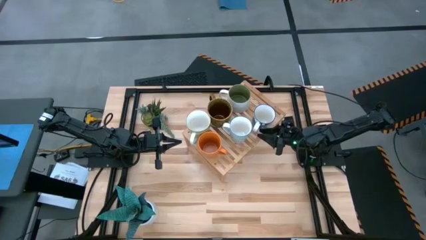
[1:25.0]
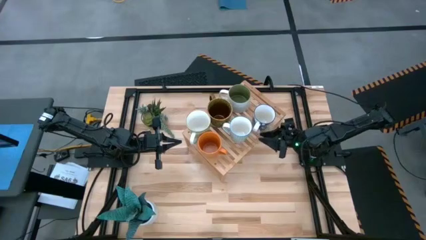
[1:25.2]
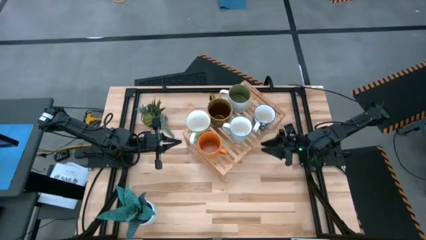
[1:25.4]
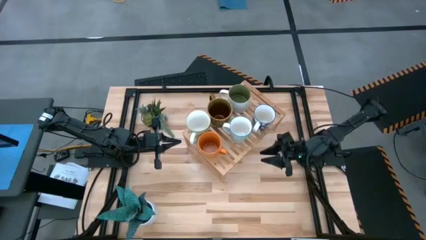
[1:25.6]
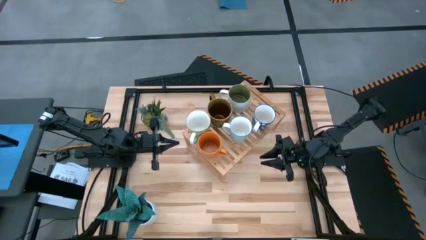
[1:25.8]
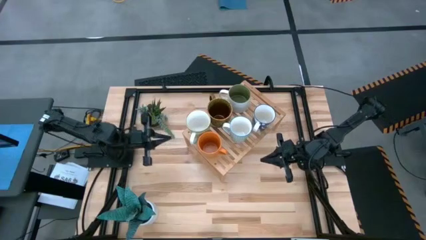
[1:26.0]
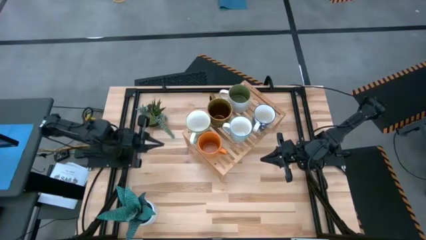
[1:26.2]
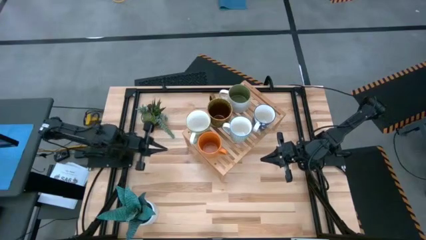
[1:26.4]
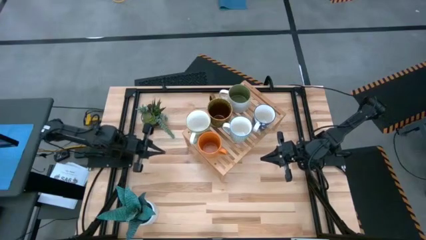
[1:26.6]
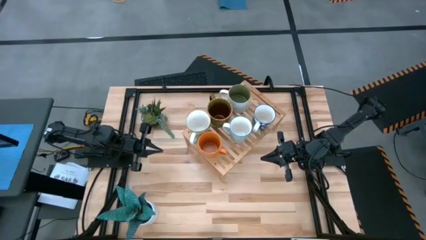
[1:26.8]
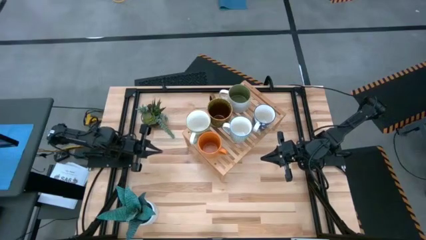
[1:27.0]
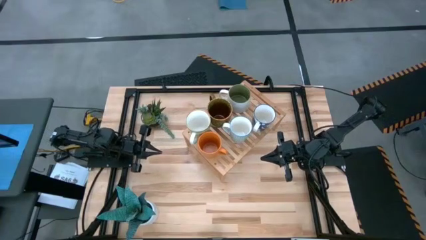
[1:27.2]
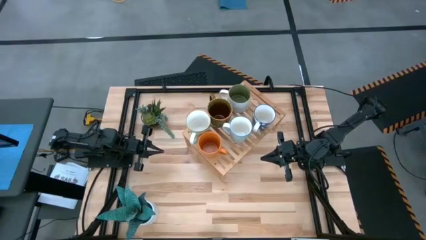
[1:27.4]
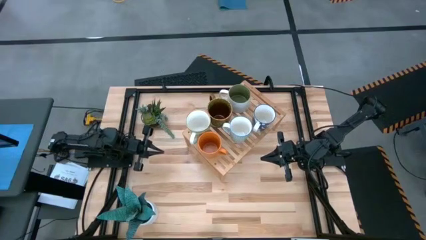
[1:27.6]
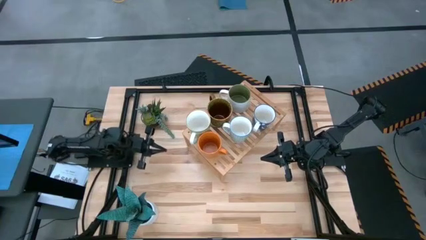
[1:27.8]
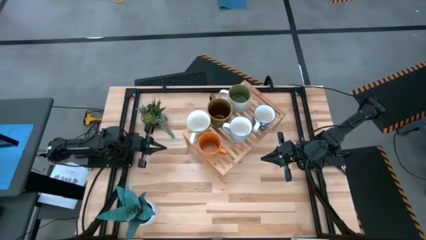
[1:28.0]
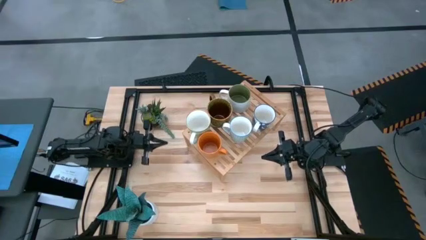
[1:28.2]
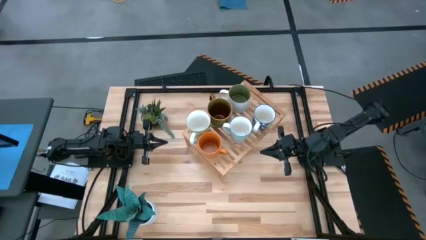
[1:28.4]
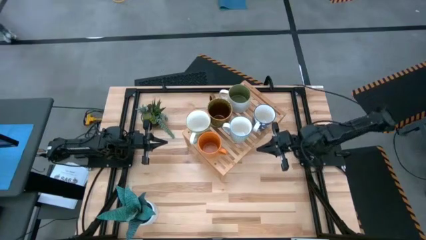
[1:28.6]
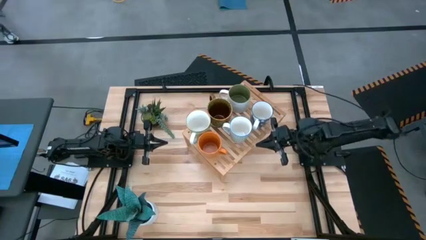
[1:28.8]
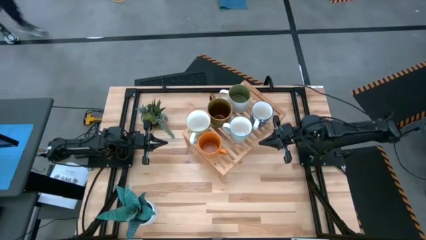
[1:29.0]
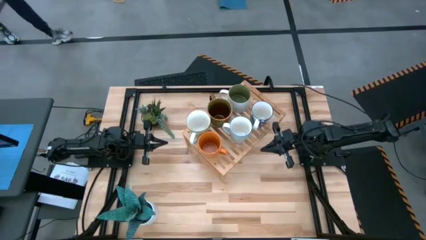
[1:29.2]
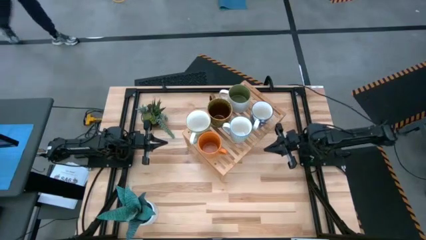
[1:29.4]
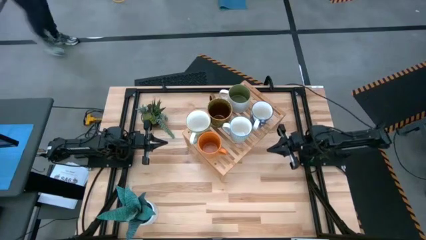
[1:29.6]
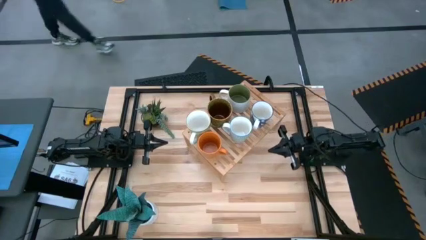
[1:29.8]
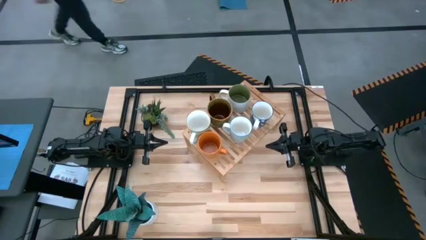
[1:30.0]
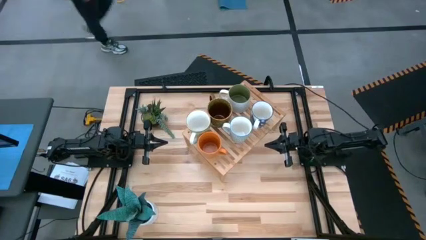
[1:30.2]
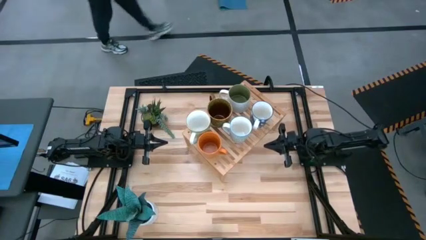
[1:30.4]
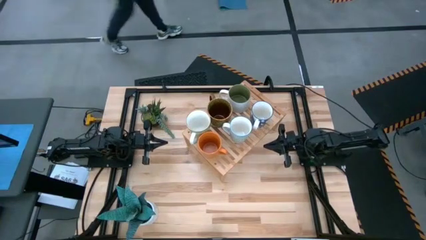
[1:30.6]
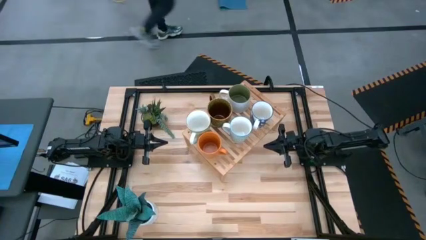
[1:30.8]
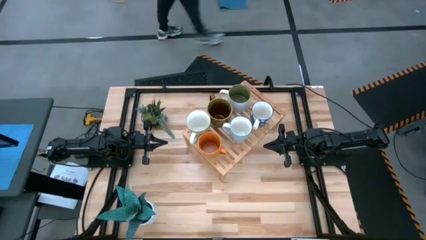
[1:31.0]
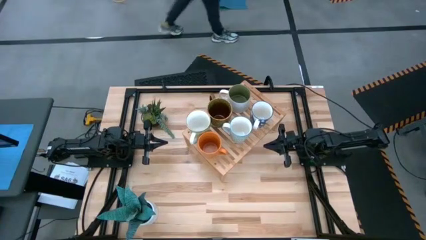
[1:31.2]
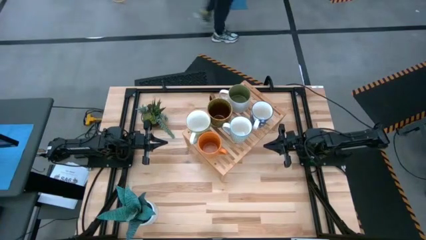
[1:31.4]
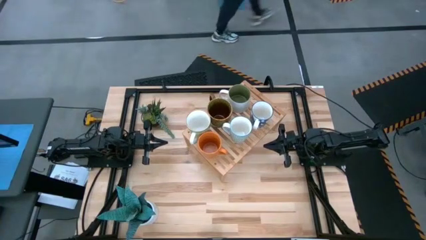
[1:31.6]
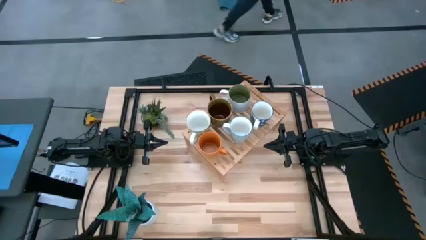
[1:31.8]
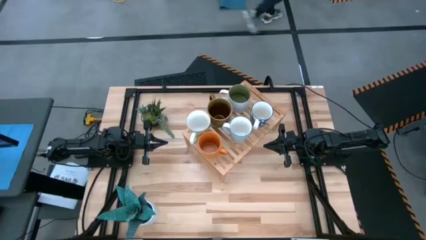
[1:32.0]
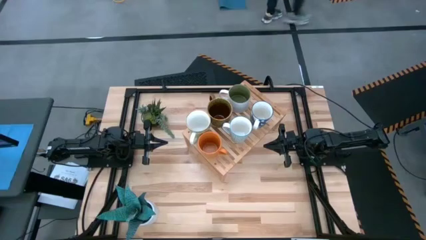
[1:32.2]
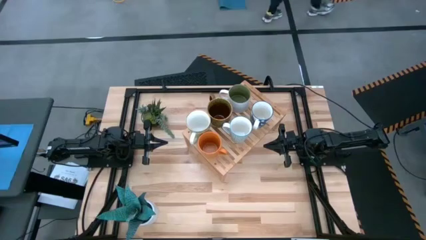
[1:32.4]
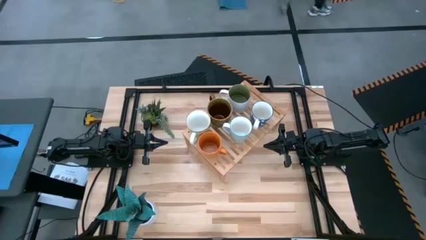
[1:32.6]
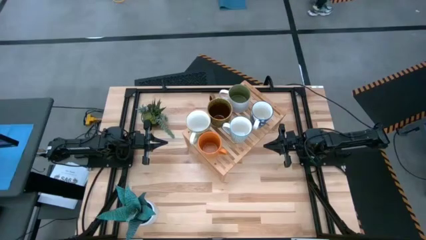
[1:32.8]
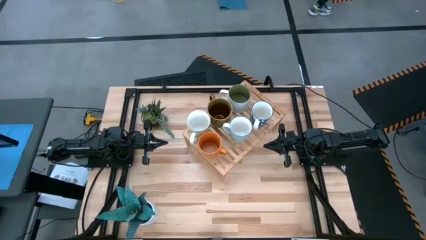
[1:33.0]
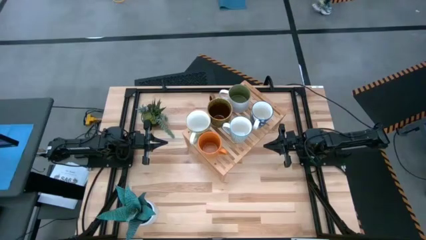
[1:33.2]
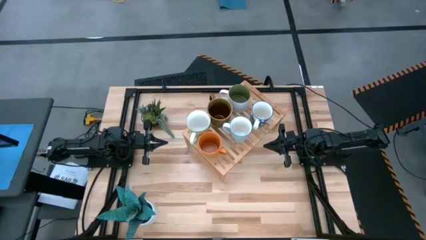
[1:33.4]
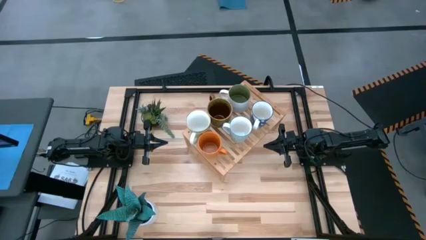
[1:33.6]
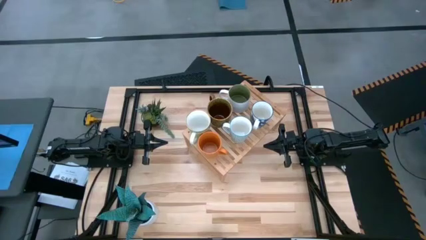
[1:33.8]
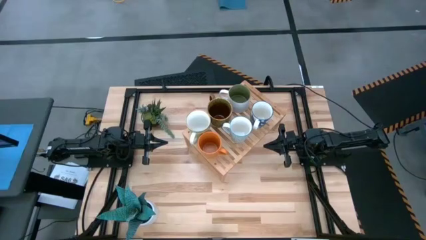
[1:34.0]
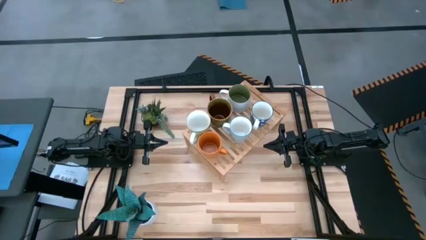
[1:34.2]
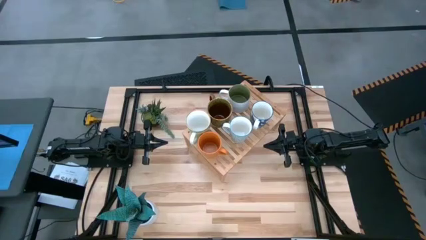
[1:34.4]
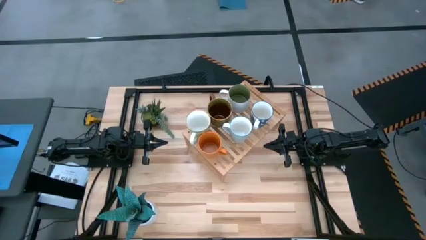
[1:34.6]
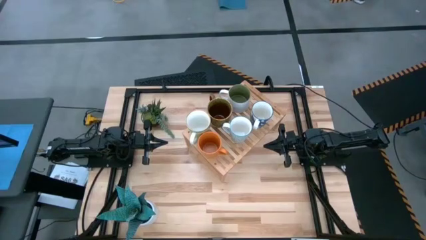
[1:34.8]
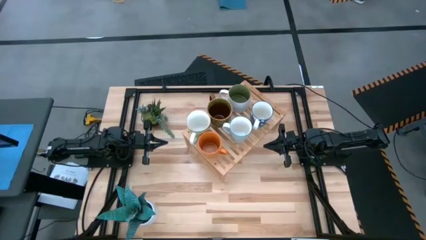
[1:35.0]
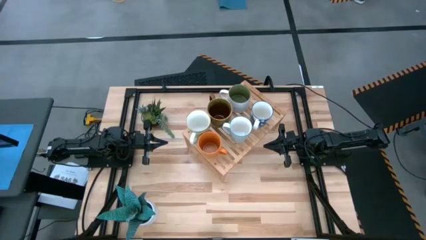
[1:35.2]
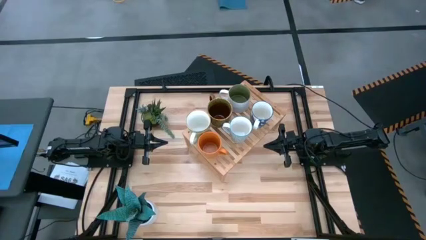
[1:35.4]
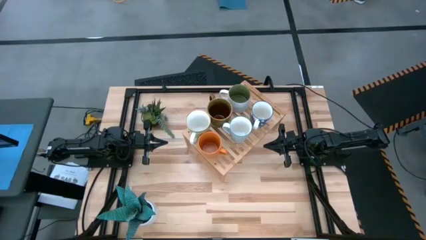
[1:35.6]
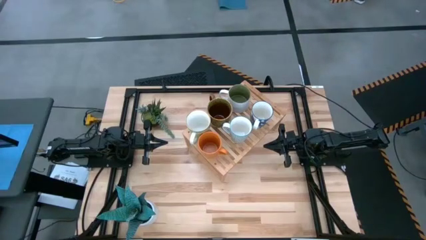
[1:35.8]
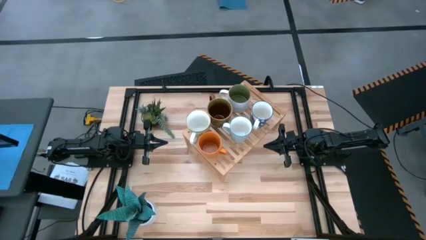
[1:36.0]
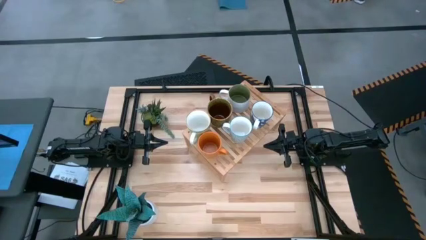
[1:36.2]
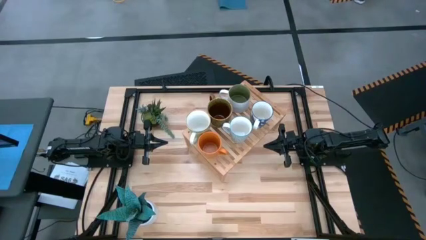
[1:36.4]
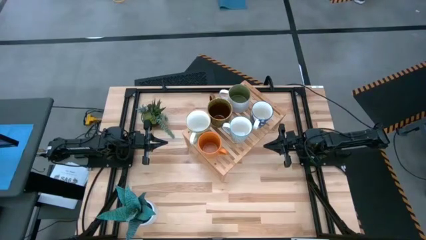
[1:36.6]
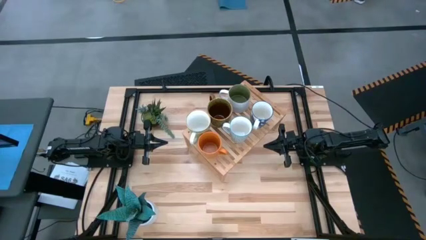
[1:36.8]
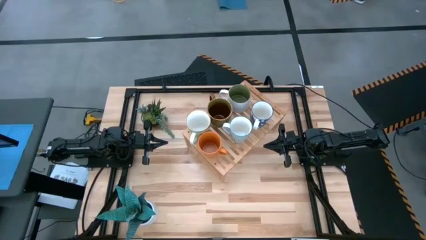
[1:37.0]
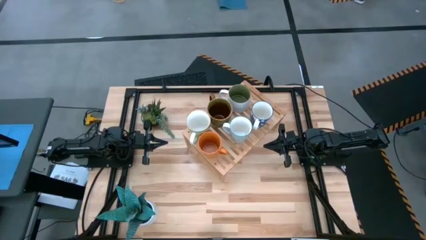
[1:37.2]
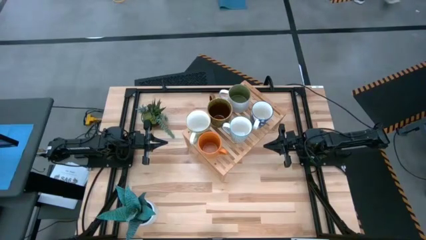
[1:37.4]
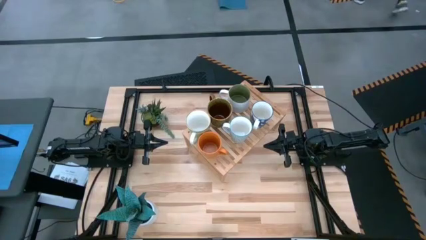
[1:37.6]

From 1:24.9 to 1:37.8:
Task: Place coffee mugs
Return to Home Position

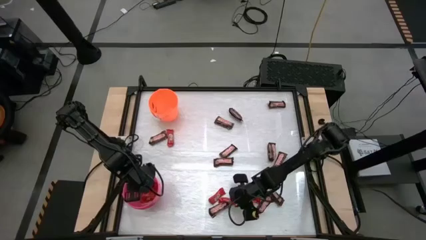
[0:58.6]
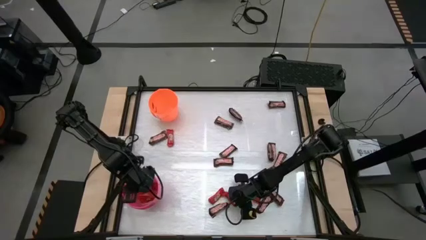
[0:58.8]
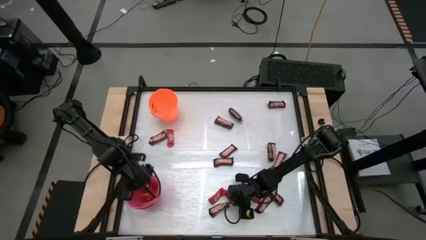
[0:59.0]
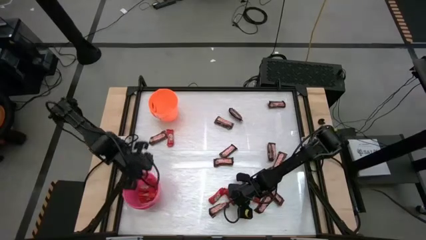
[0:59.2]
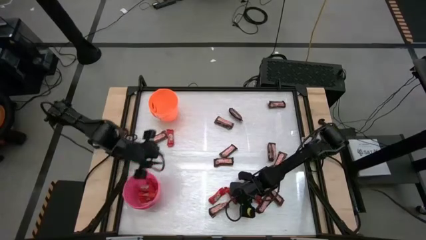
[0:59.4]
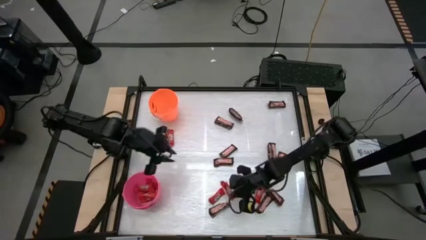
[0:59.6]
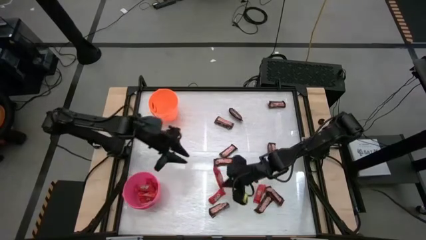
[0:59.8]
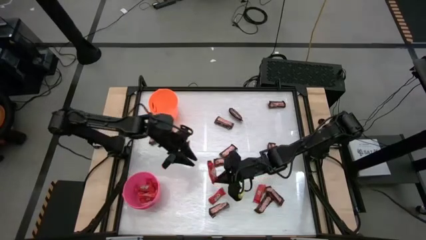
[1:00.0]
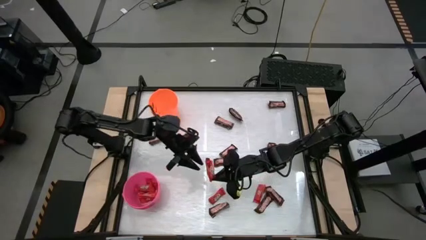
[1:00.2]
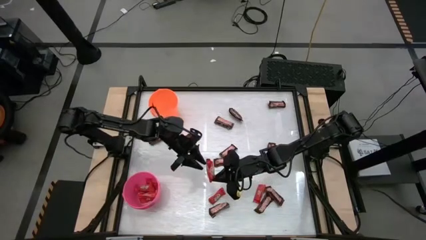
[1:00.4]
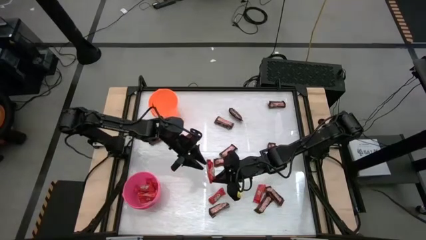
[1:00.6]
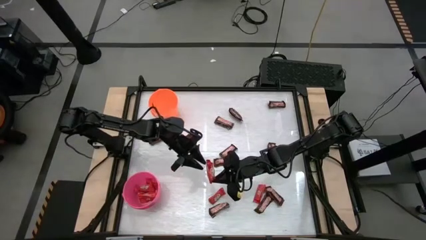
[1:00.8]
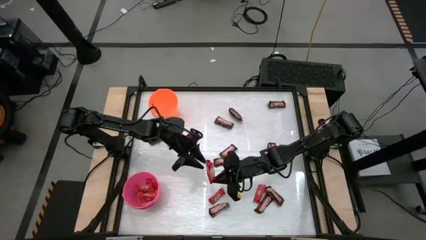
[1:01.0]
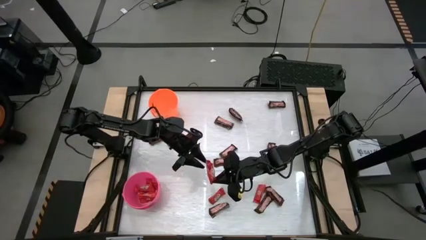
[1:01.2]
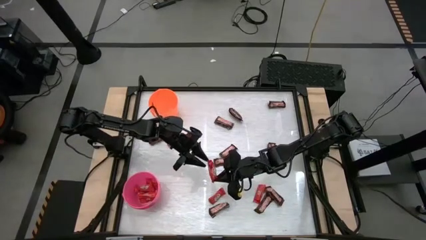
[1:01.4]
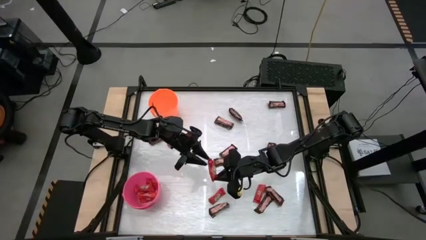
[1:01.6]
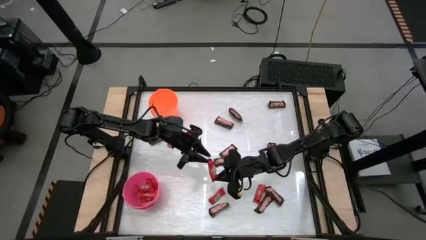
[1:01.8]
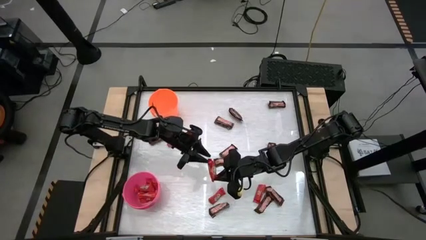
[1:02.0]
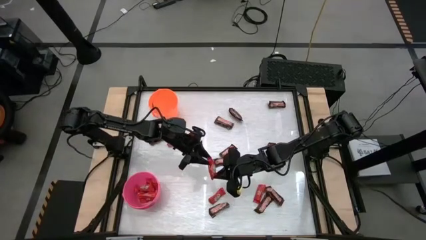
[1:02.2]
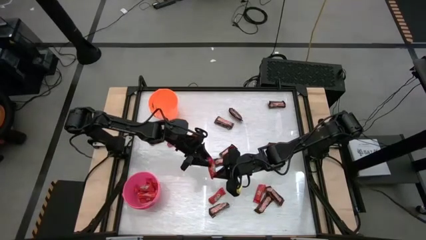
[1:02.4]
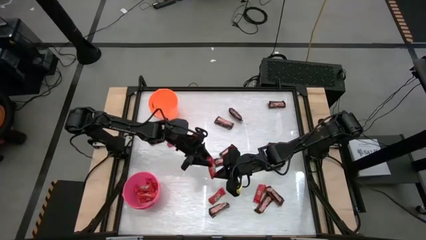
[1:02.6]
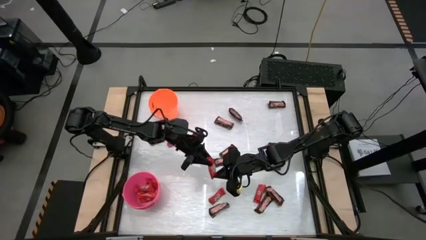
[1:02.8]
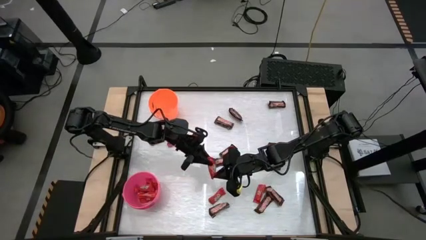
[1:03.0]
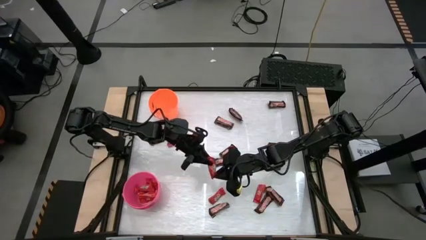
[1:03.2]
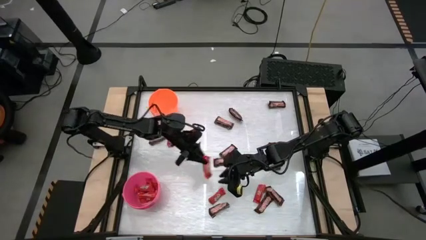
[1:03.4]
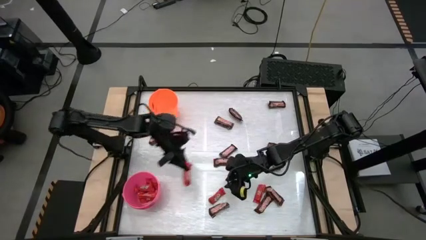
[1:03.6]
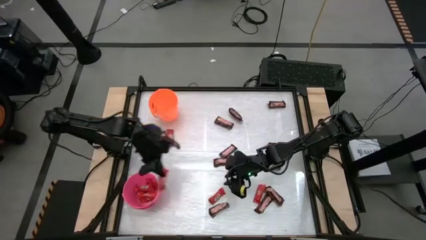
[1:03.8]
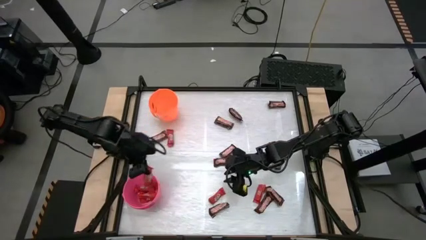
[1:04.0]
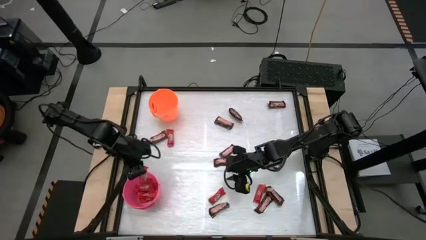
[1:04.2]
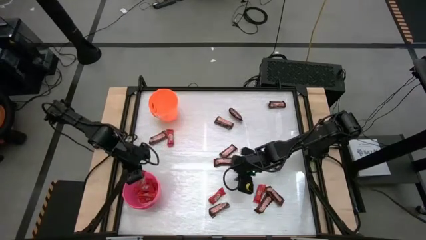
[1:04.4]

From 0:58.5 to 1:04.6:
Task: Sort candy by brand, put in halloween buckets
Put the red chocolate bar into the pink bucket
